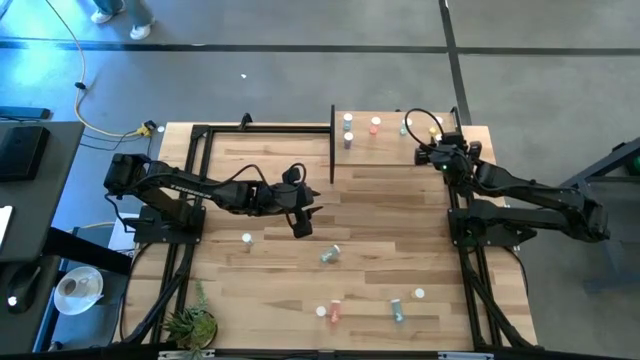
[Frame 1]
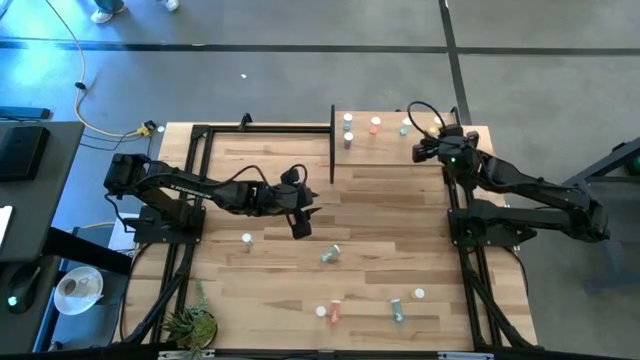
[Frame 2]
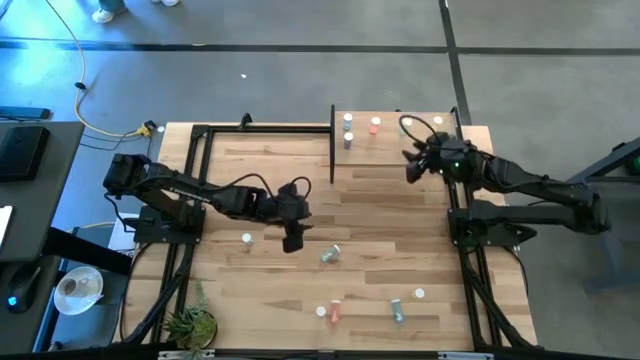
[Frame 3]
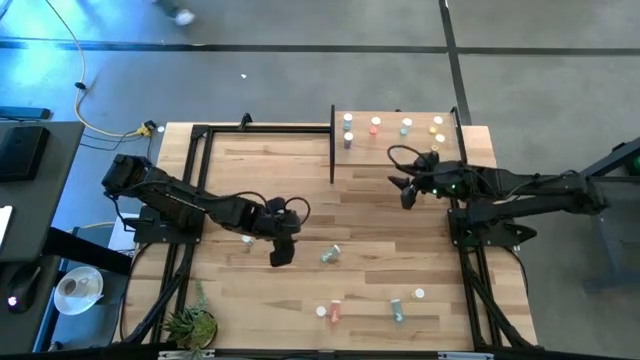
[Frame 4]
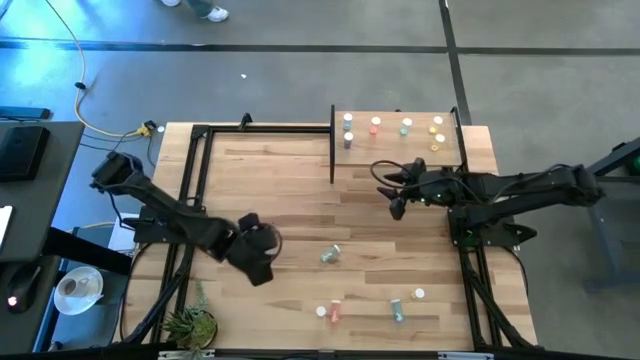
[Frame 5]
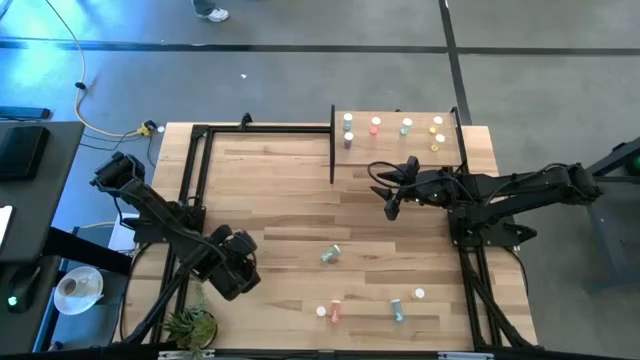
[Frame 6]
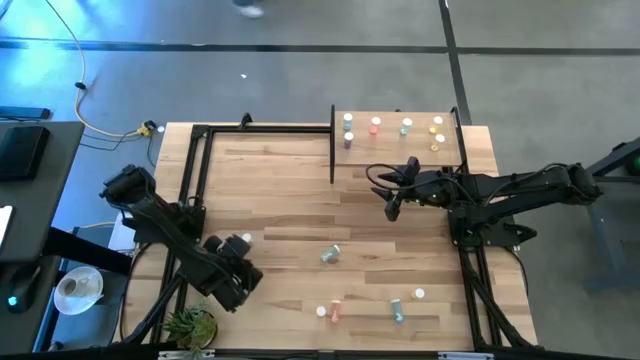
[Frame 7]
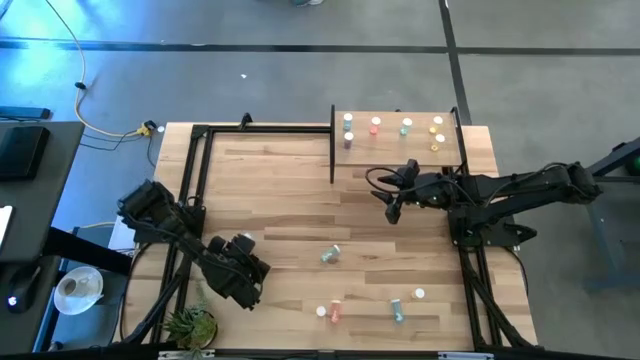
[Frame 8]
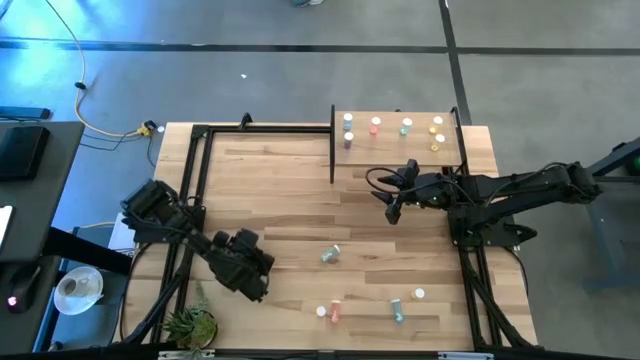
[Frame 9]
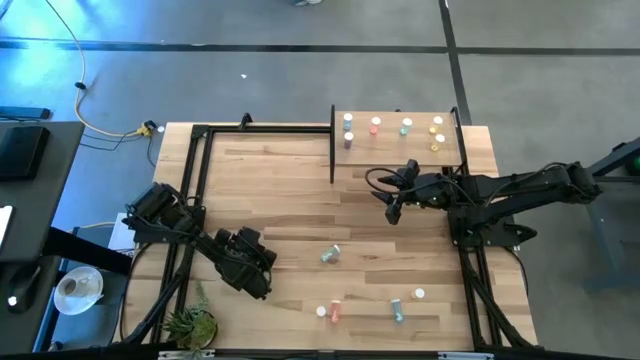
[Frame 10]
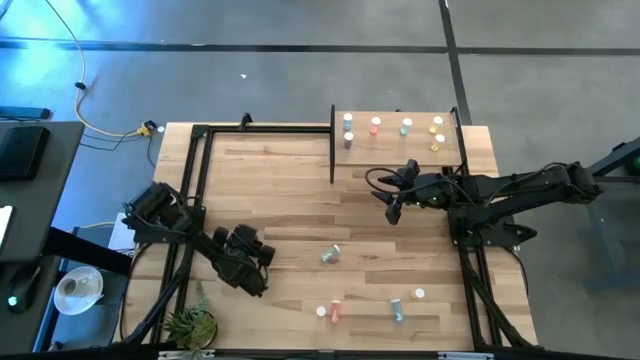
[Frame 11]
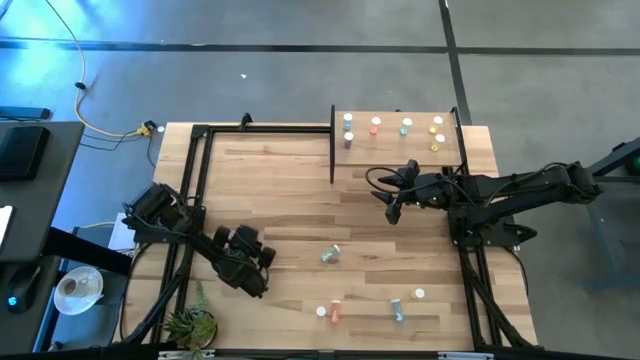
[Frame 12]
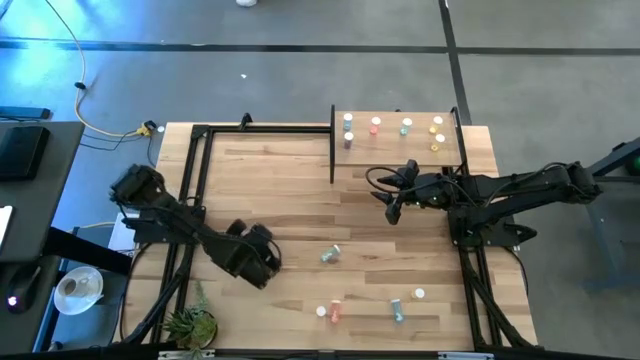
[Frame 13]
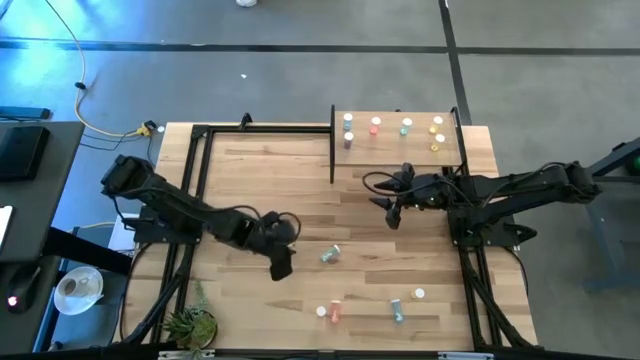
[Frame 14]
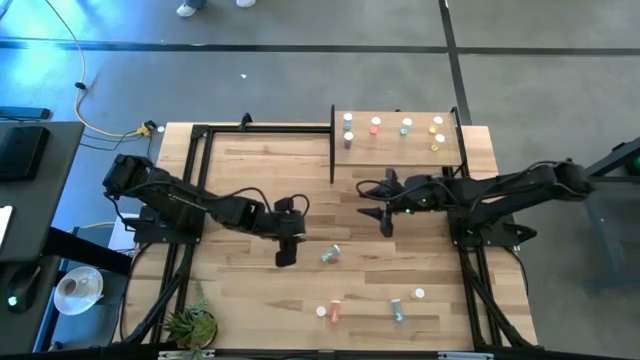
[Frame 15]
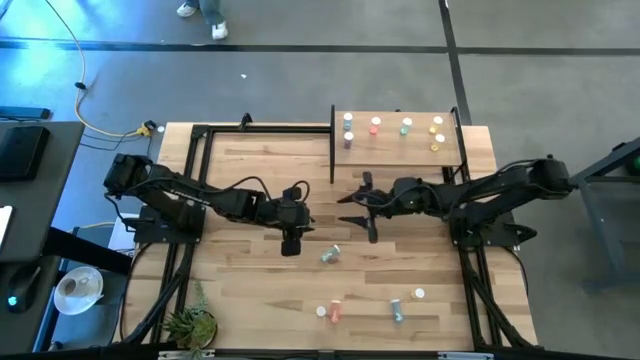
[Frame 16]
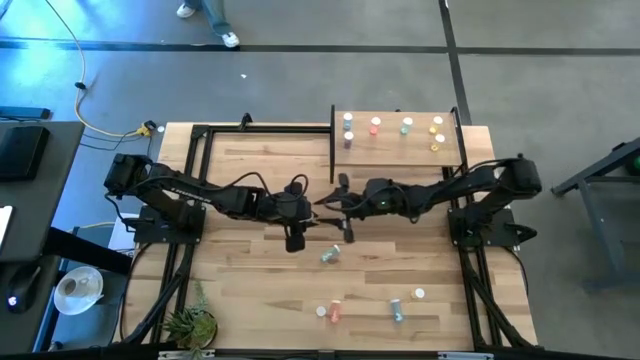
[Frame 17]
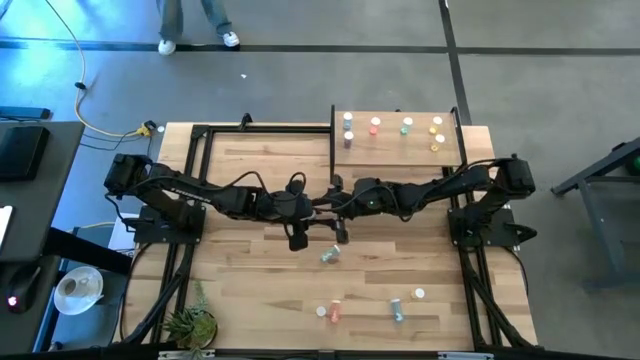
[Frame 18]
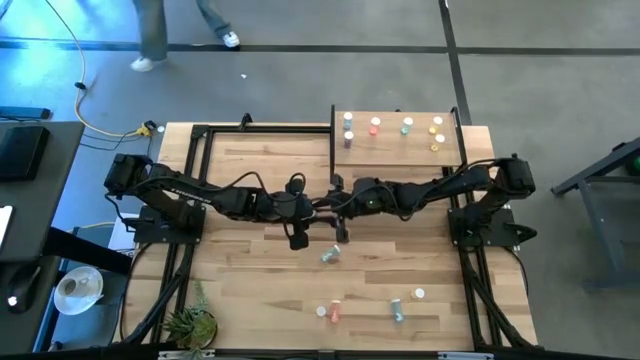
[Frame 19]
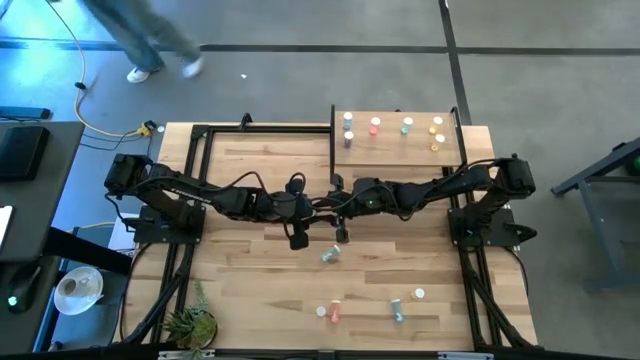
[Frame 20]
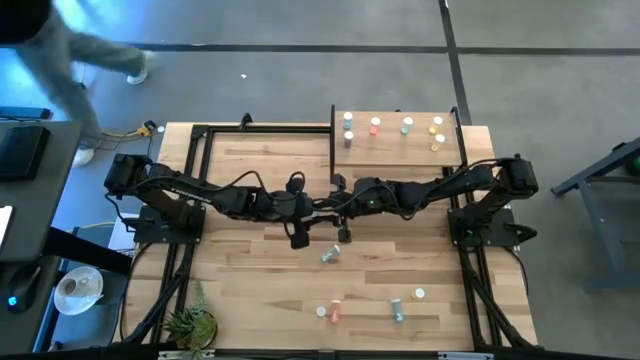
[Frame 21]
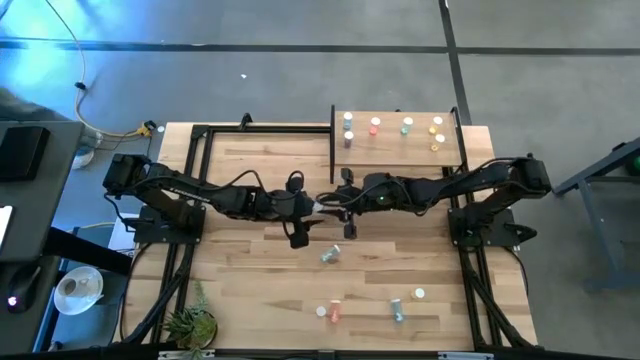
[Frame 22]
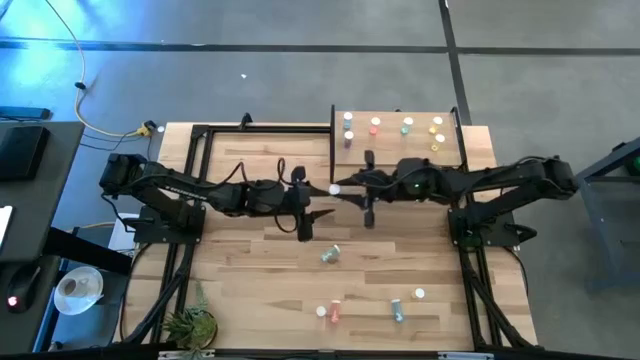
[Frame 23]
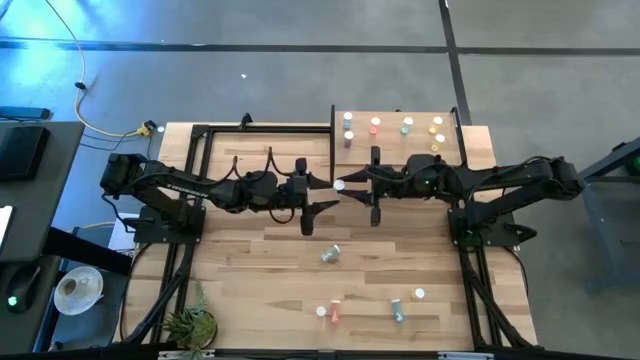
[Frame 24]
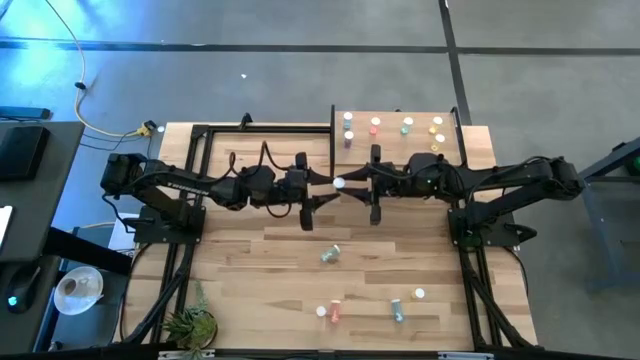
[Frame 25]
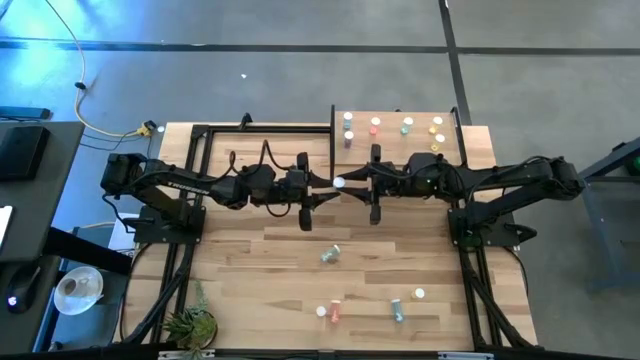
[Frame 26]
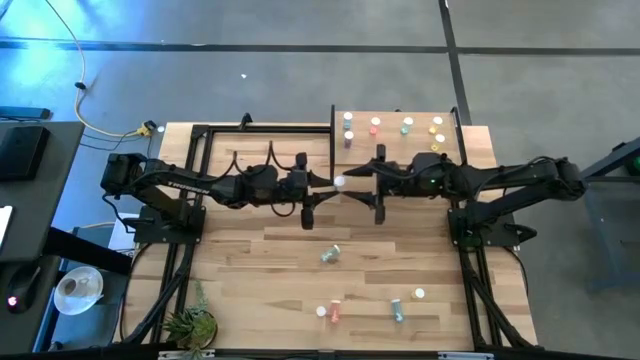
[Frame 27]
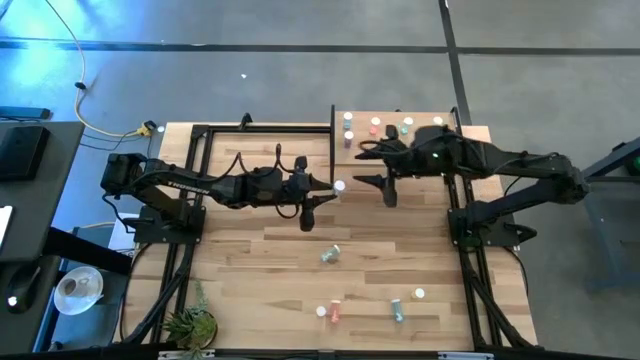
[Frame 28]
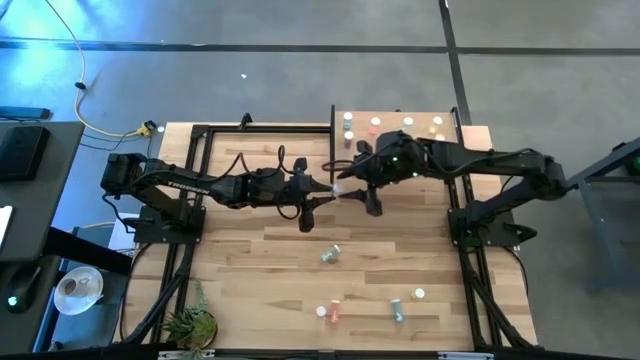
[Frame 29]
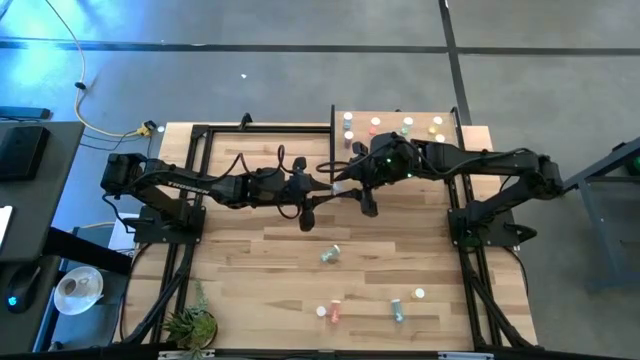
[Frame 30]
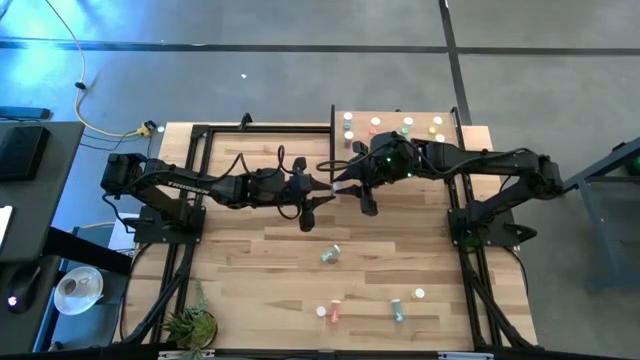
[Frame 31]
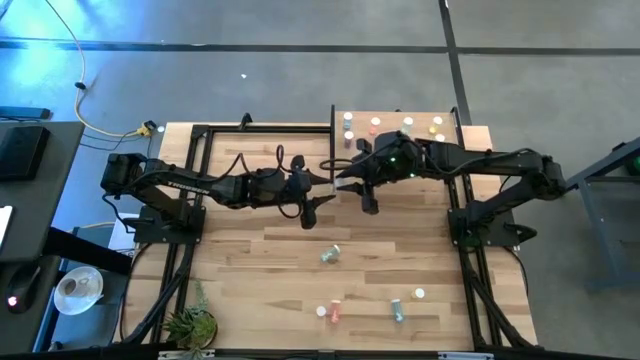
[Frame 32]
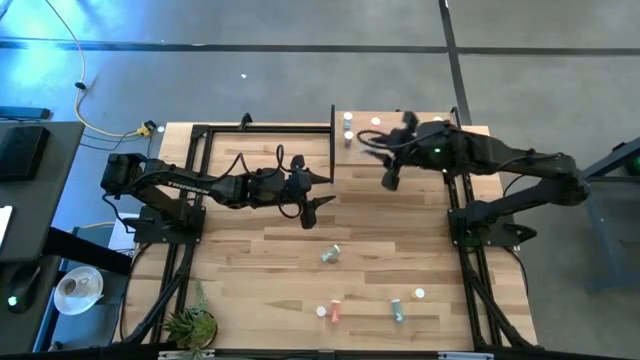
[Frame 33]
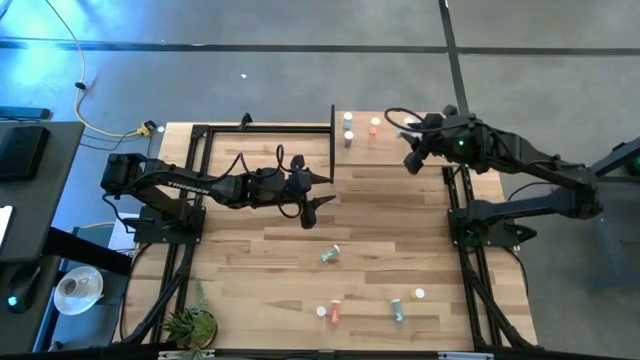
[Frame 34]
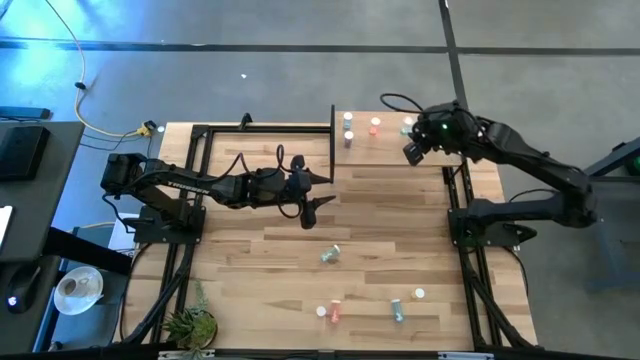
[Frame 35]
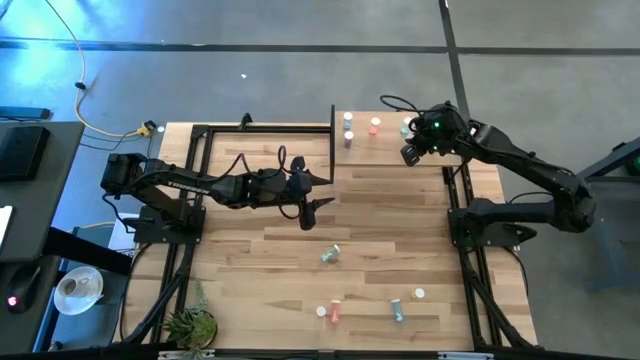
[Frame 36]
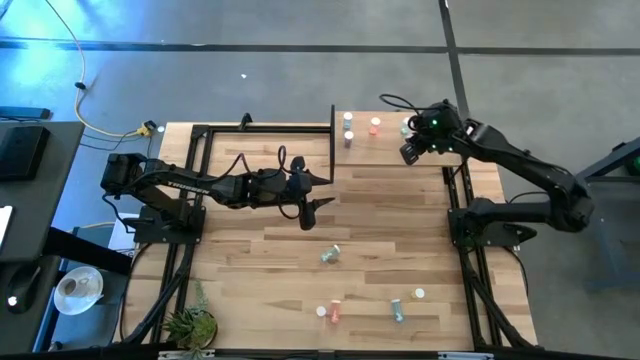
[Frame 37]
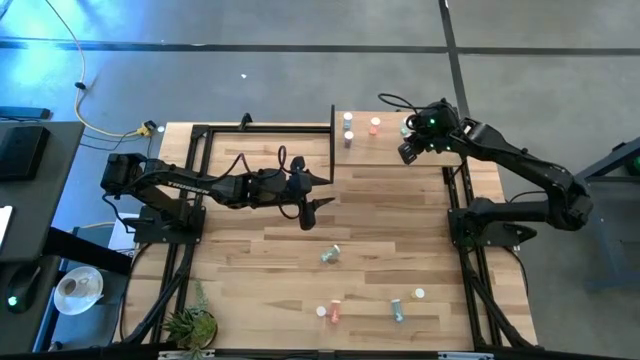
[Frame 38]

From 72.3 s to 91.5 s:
Task: Pick and place medicine bottles onto shelf by color
Put the left green pill bottle on the shelf aligned with the green pill bottle

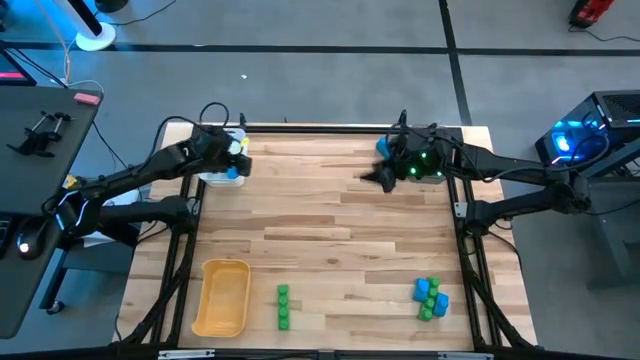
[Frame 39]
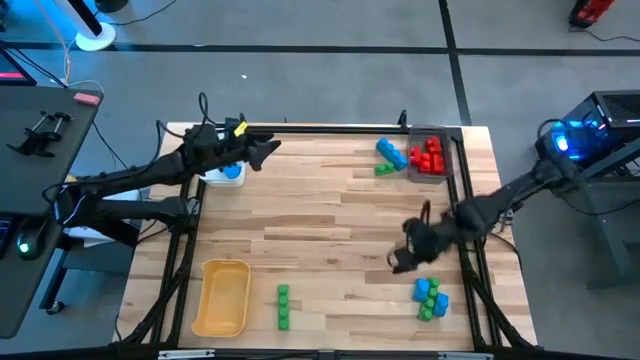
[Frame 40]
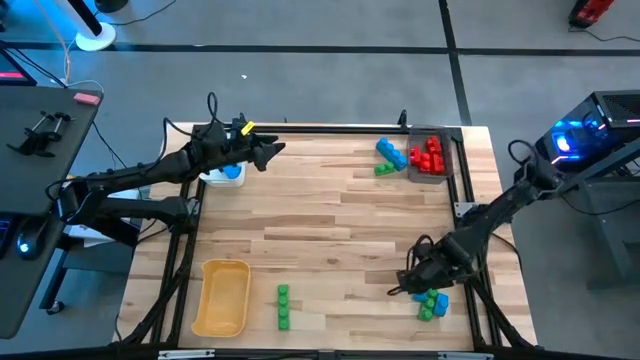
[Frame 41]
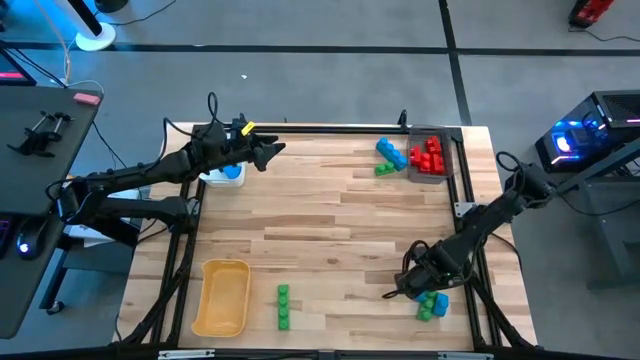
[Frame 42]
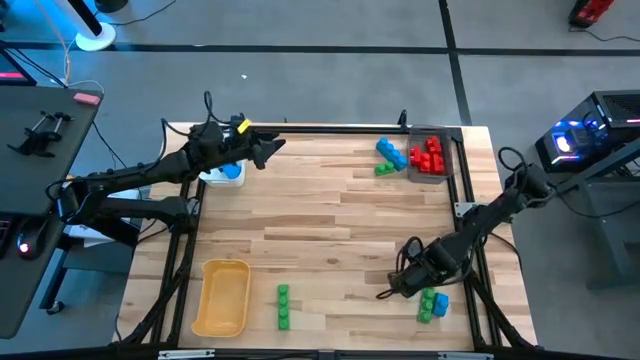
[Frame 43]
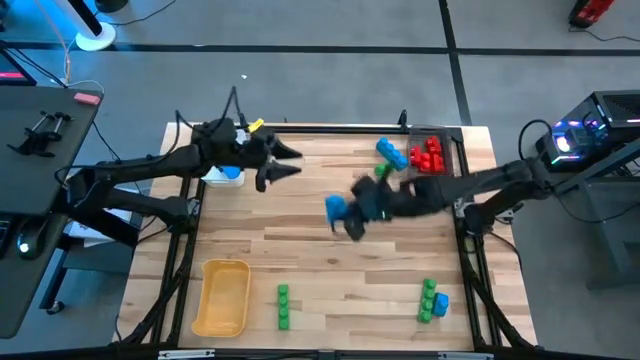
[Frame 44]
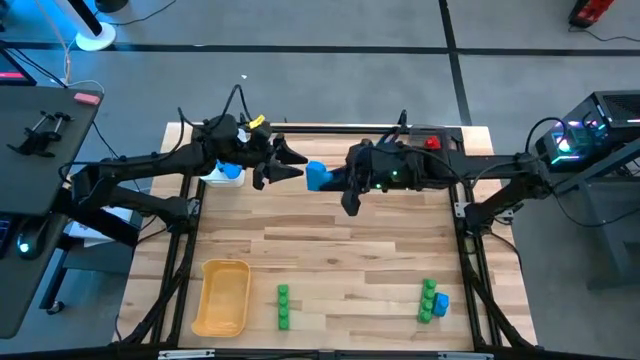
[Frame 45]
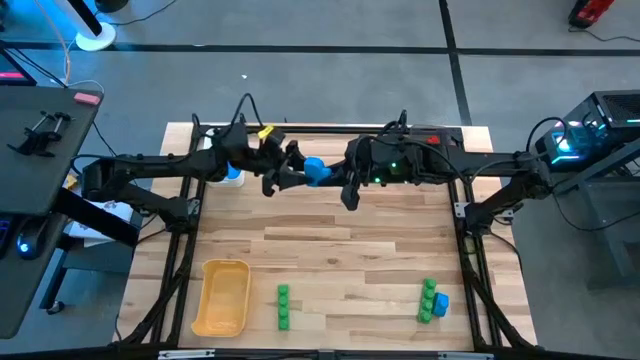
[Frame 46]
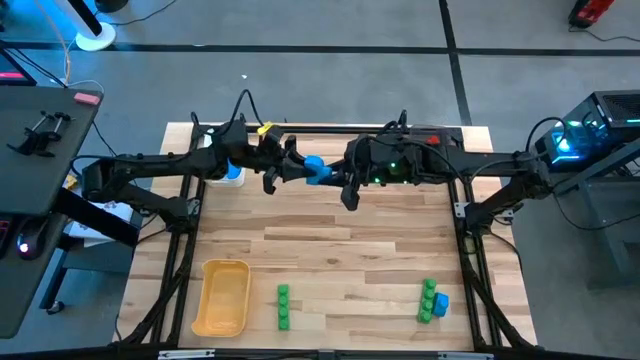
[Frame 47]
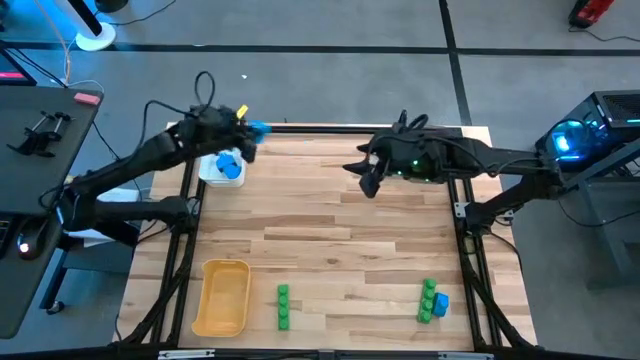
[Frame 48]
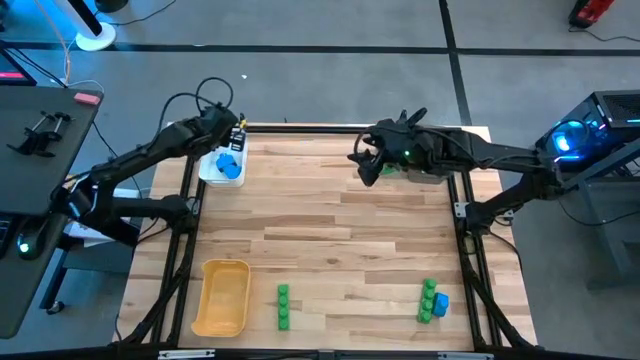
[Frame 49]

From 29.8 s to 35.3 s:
Task: Sort blocks
Put the blue game piece into the white bin
